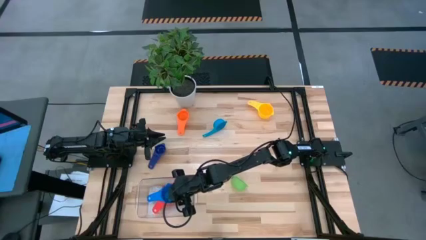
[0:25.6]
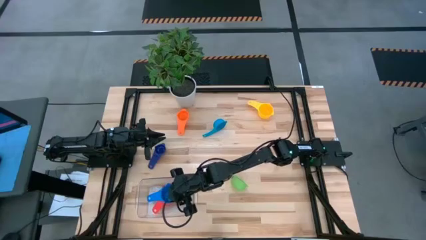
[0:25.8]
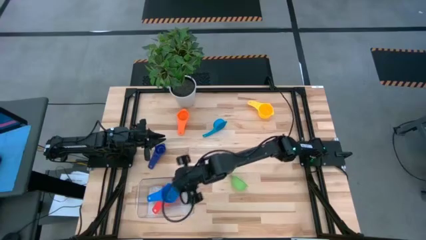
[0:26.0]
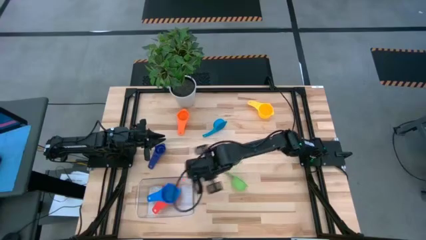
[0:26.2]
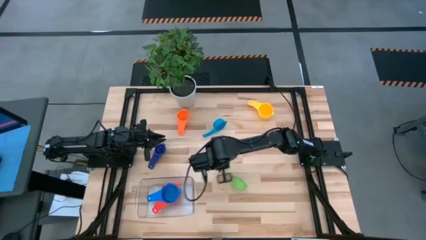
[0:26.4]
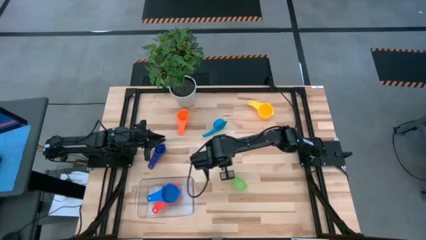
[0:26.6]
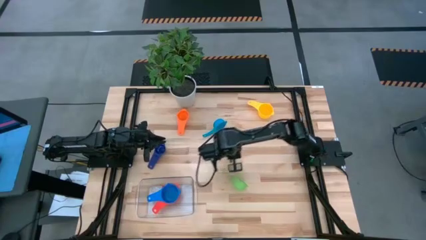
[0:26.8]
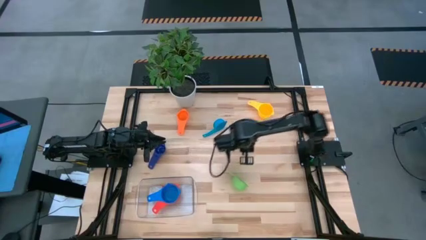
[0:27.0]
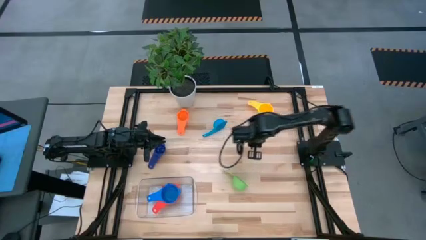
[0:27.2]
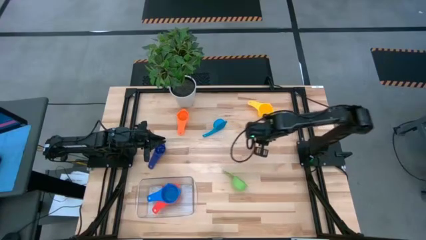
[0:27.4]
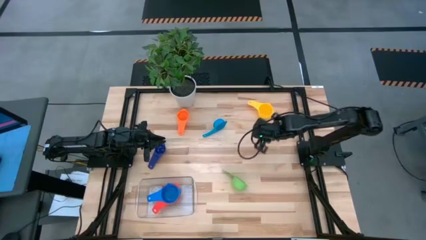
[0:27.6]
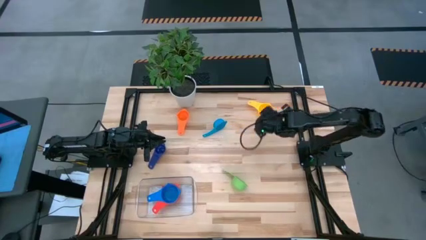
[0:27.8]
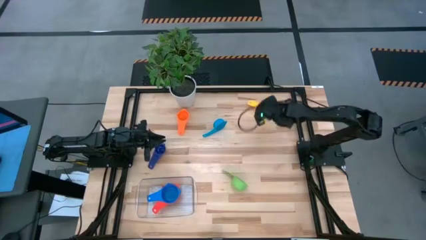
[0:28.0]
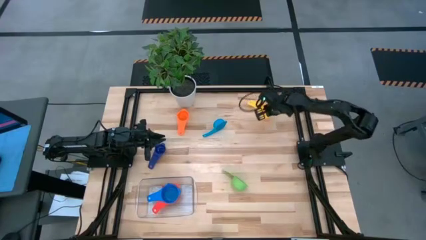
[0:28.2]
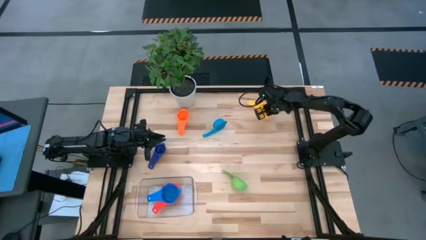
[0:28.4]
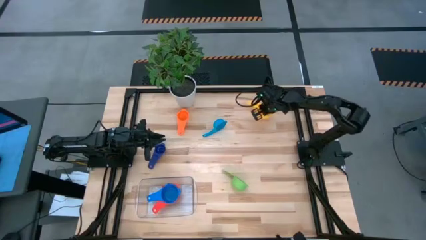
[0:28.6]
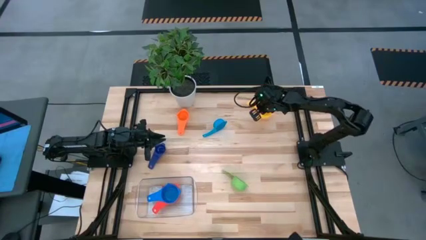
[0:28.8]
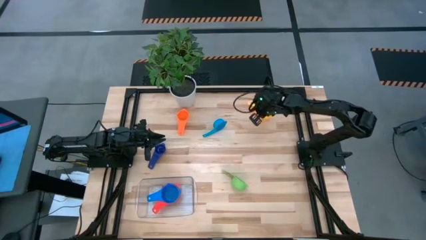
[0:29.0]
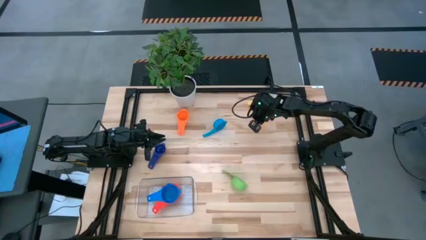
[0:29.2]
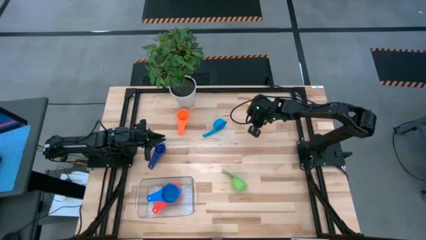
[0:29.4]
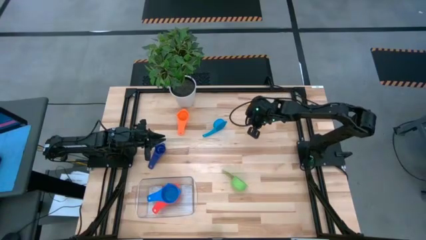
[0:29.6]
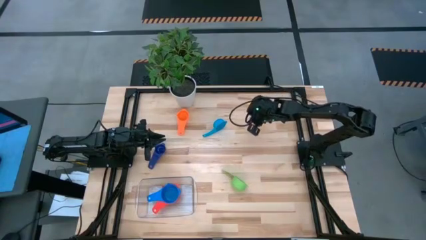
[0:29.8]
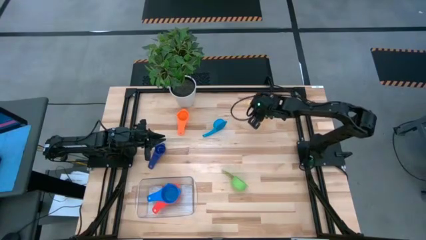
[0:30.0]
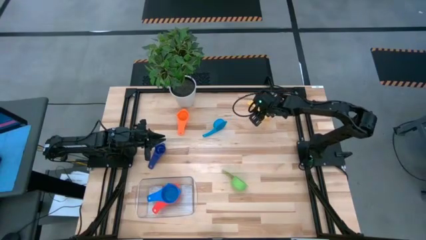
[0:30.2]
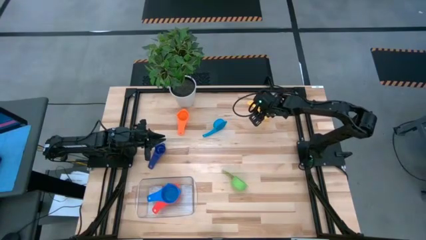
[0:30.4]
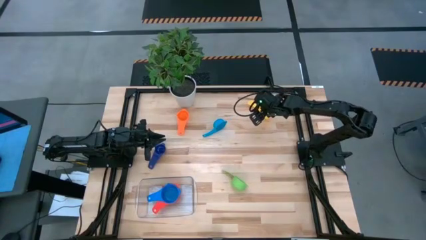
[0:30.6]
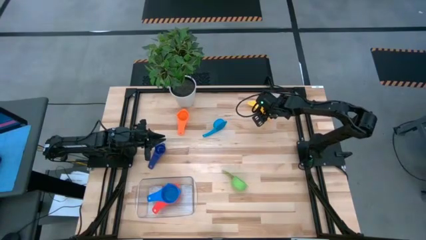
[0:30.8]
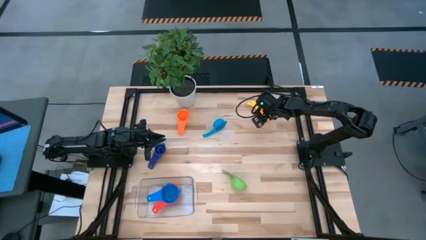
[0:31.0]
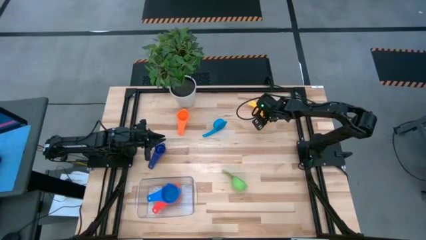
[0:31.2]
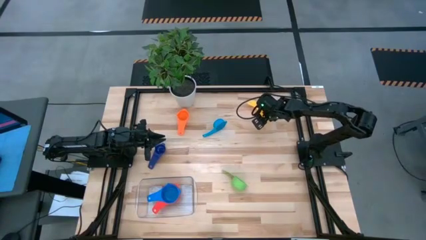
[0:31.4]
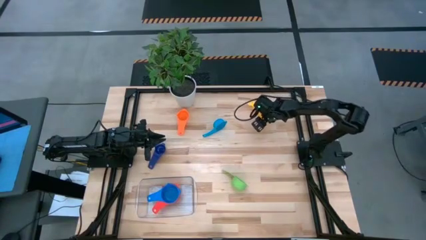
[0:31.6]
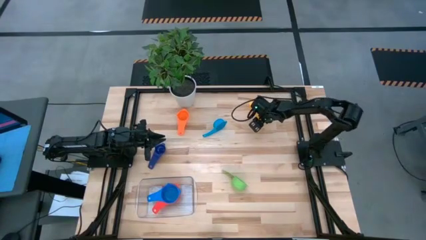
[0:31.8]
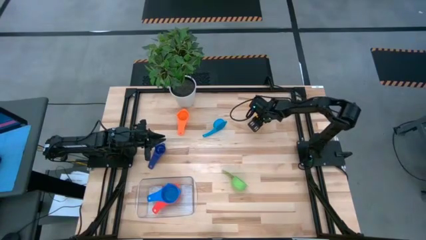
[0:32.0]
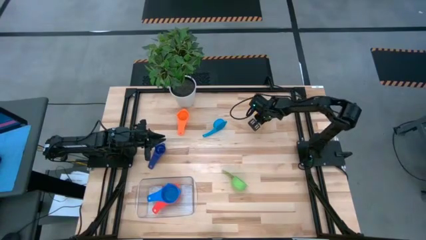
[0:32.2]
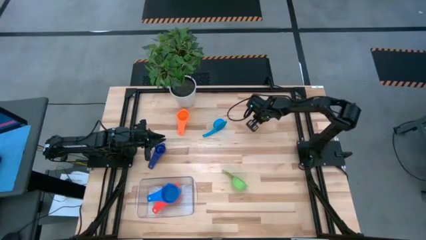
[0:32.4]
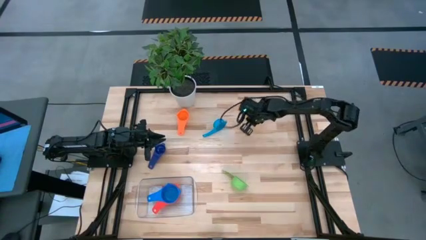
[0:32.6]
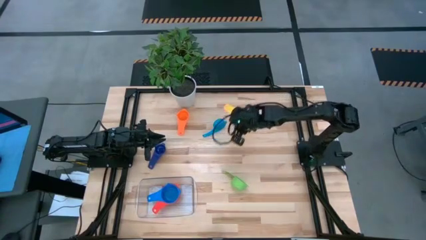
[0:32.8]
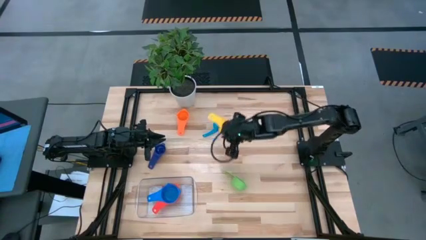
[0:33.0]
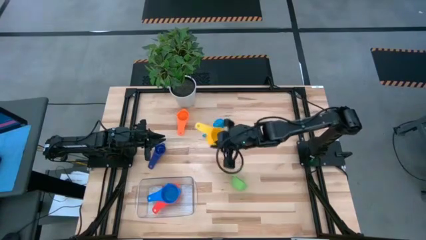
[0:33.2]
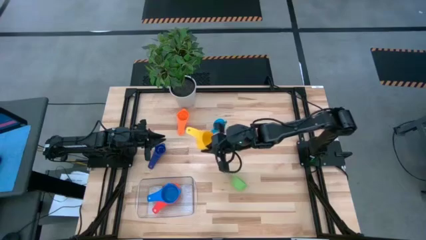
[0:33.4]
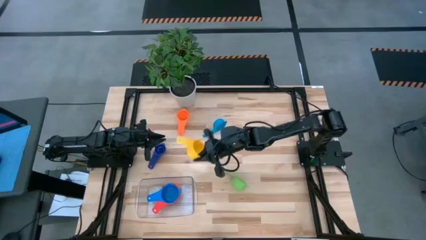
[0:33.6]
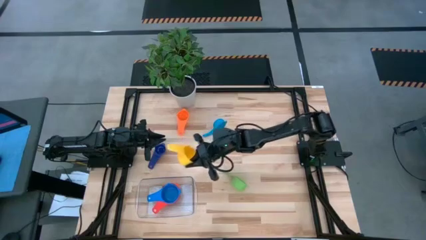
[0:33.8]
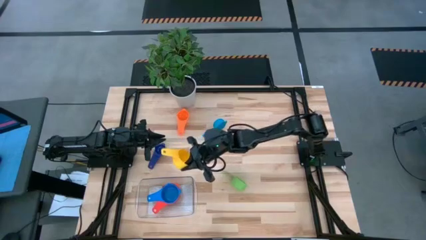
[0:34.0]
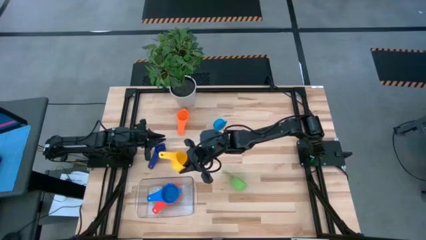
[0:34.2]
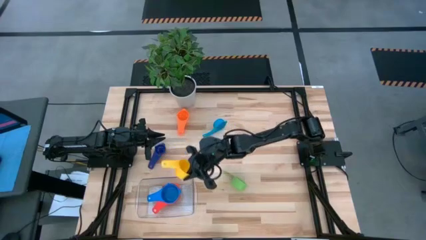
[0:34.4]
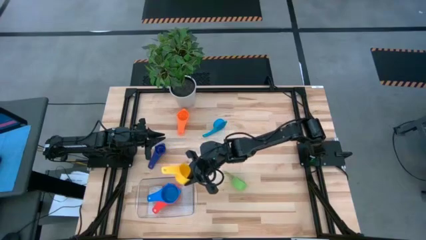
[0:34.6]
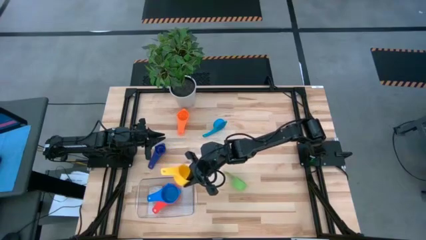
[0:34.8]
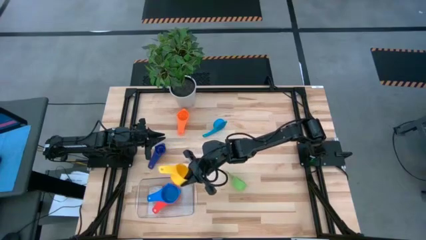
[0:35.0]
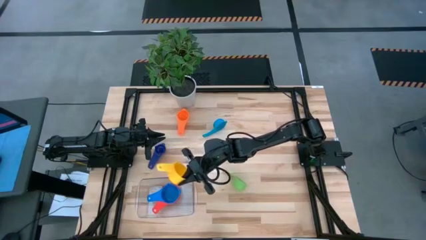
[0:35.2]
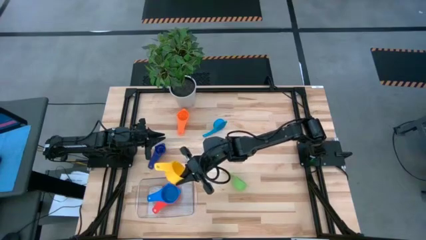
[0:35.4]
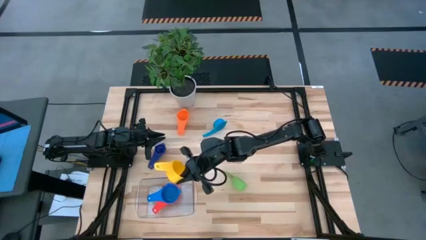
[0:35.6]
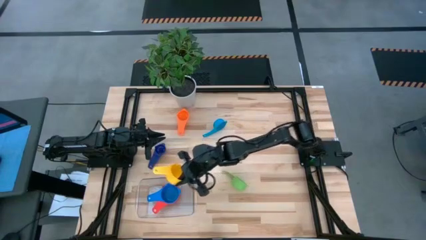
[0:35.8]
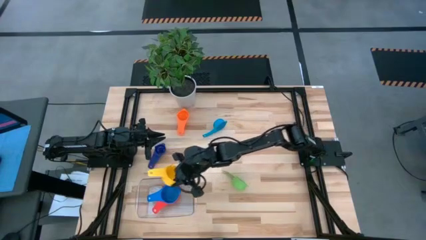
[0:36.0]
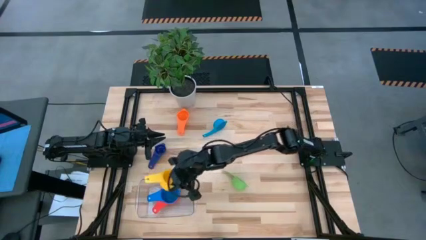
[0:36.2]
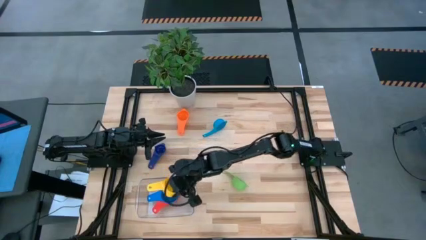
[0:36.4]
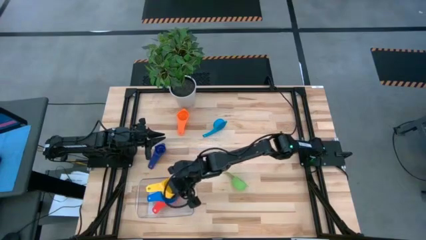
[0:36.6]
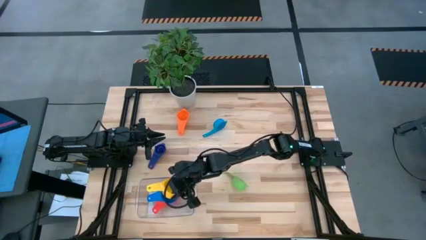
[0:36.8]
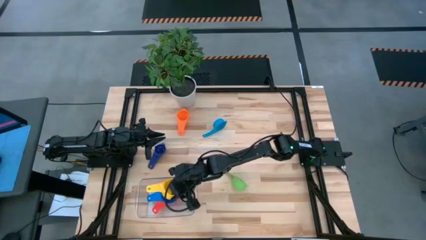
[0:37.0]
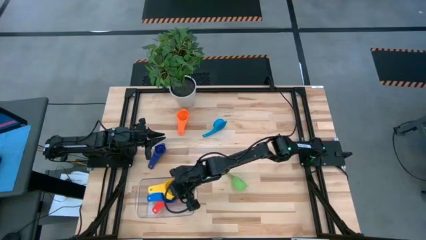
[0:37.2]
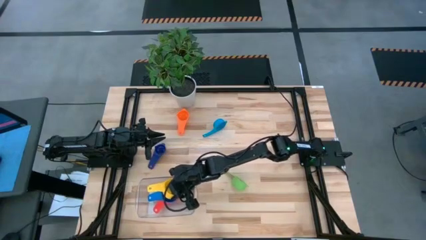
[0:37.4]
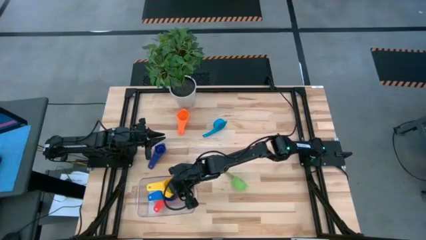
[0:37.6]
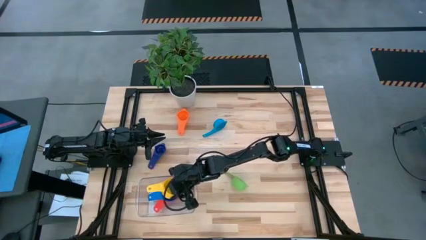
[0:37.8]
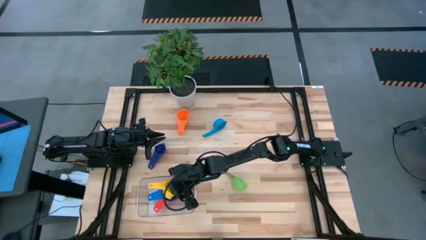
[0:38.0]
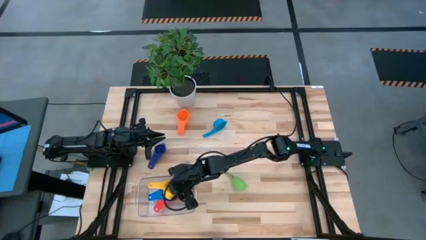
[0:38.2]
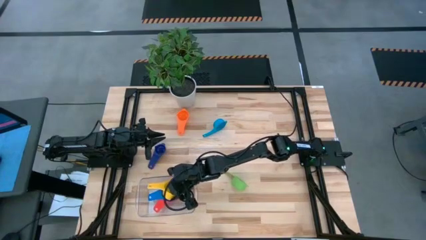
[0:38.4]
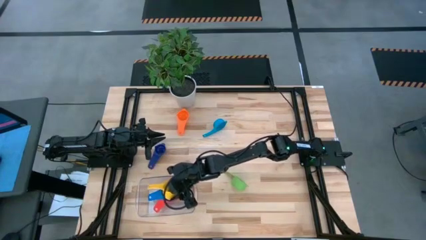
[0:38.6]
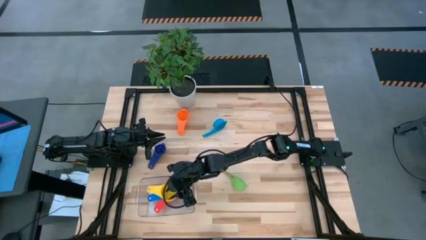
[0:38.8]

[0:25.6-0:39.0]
Task: Nest measuring cups in basket
Stack the yellow measuring cup on top of the blue measuring cup
